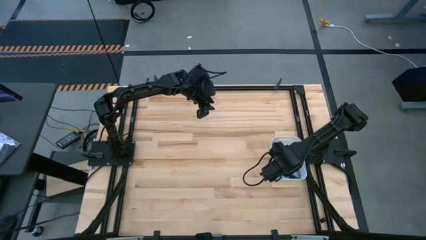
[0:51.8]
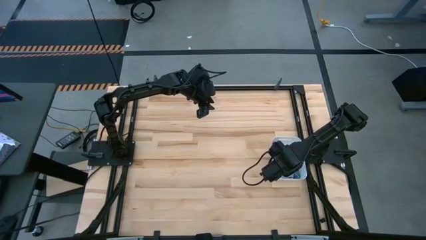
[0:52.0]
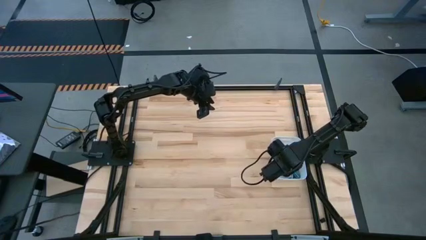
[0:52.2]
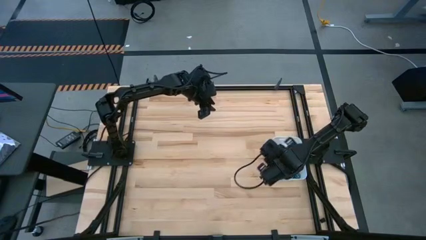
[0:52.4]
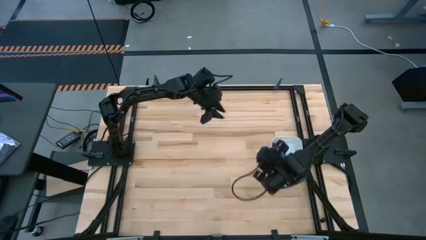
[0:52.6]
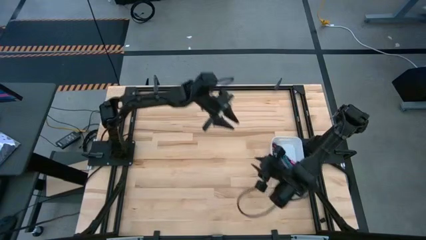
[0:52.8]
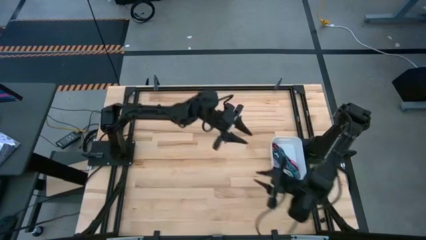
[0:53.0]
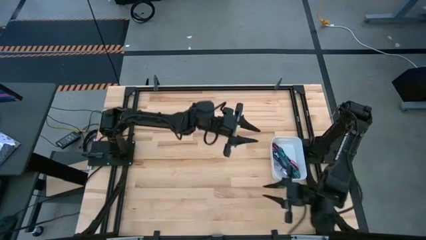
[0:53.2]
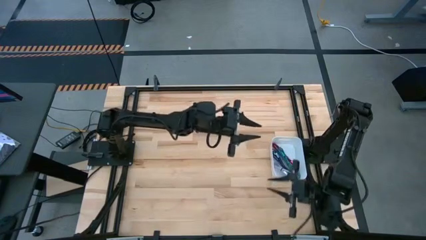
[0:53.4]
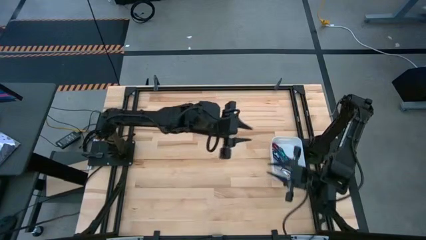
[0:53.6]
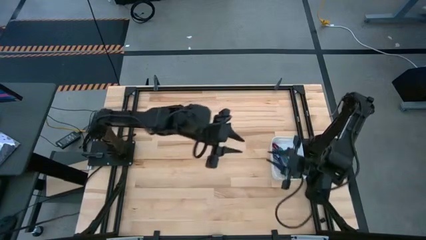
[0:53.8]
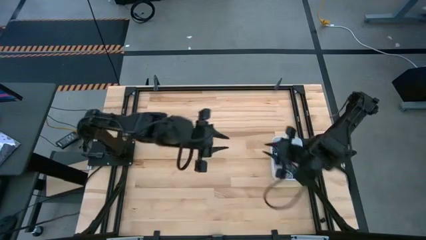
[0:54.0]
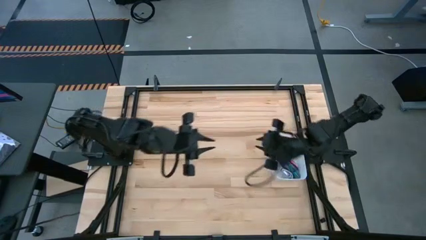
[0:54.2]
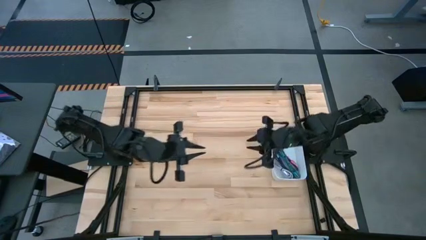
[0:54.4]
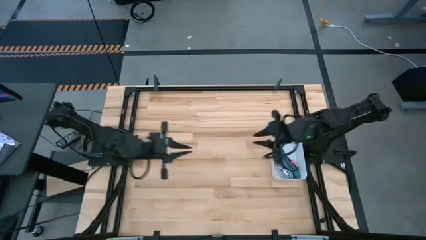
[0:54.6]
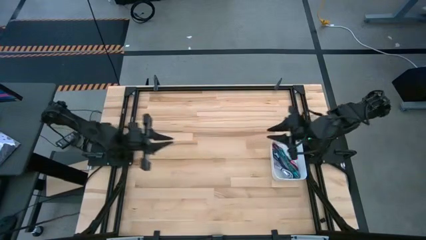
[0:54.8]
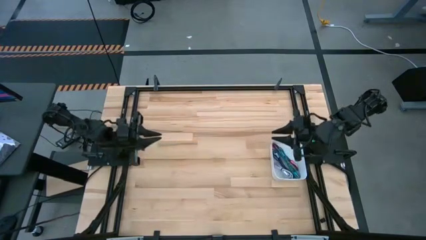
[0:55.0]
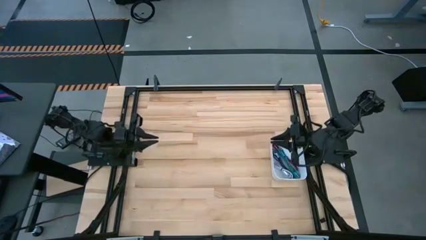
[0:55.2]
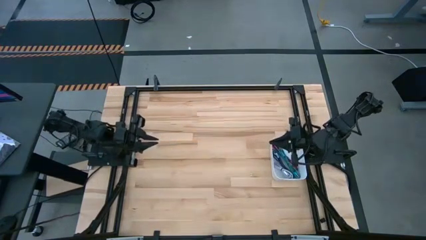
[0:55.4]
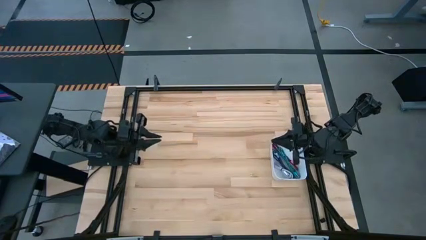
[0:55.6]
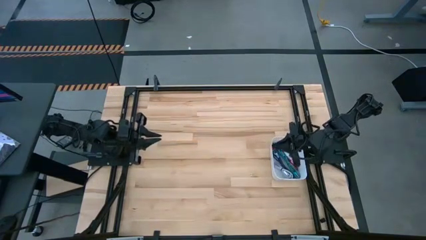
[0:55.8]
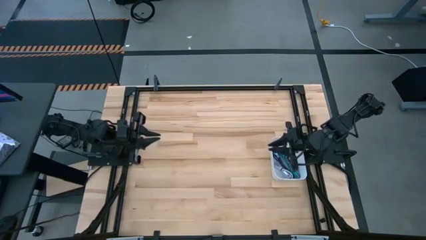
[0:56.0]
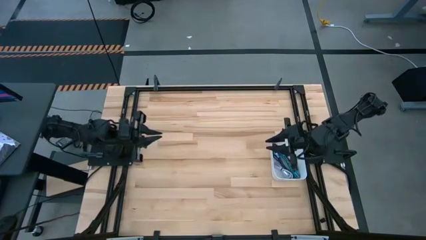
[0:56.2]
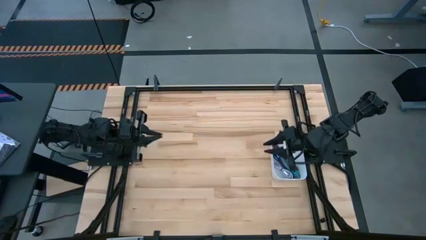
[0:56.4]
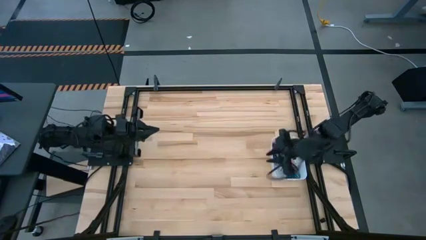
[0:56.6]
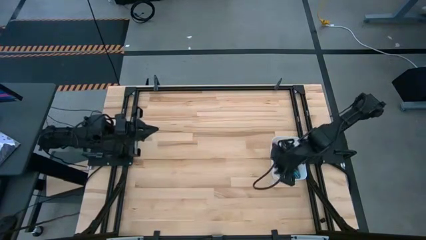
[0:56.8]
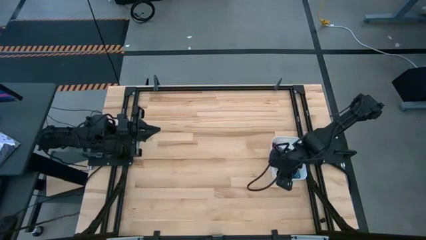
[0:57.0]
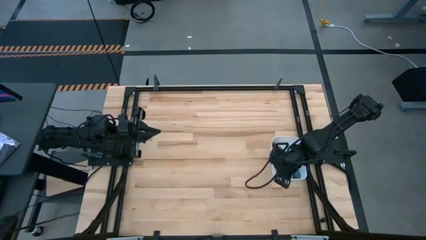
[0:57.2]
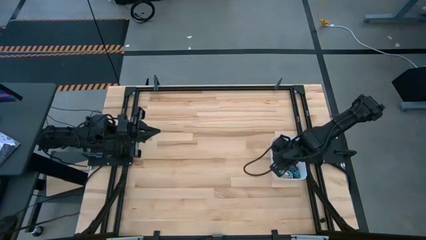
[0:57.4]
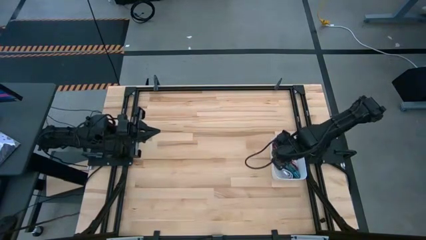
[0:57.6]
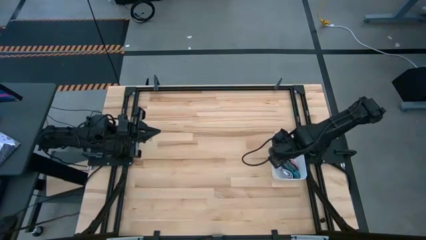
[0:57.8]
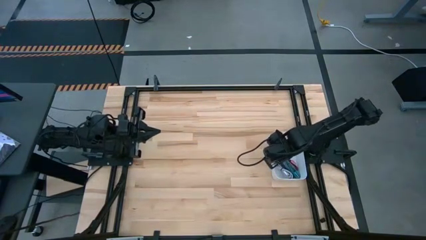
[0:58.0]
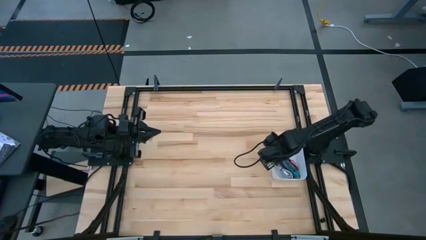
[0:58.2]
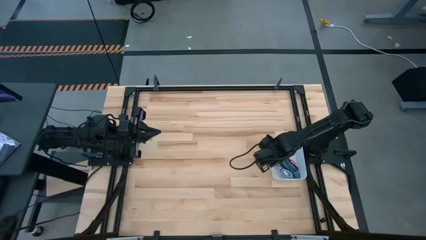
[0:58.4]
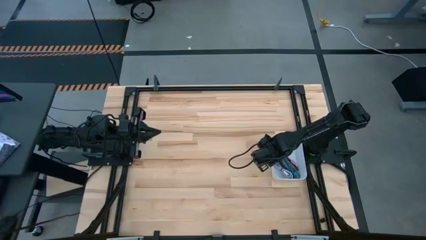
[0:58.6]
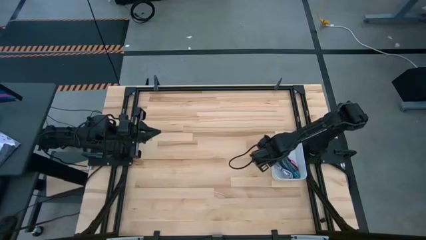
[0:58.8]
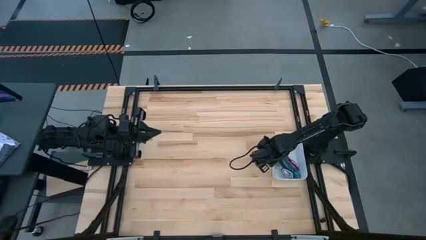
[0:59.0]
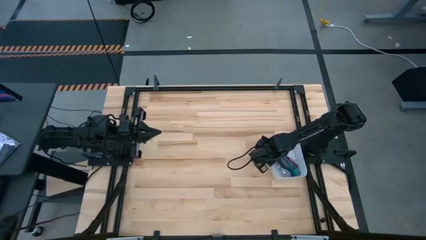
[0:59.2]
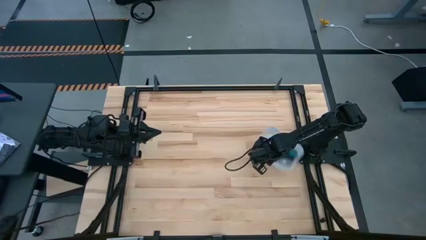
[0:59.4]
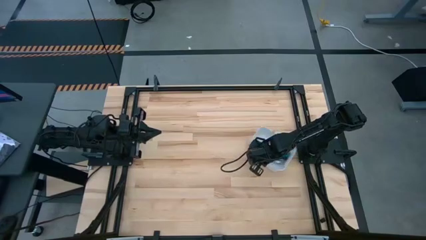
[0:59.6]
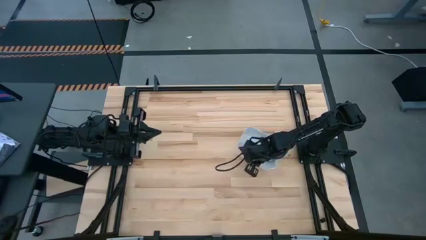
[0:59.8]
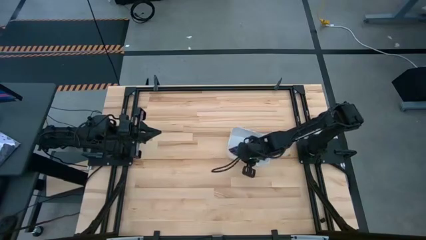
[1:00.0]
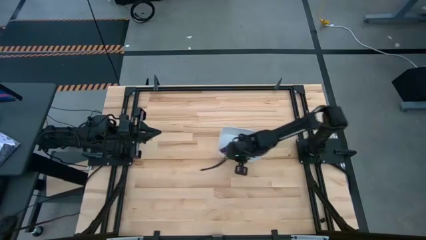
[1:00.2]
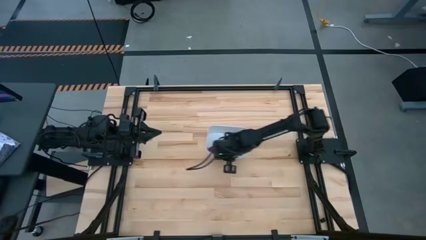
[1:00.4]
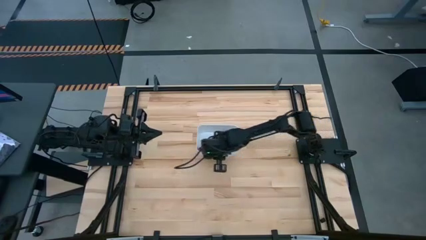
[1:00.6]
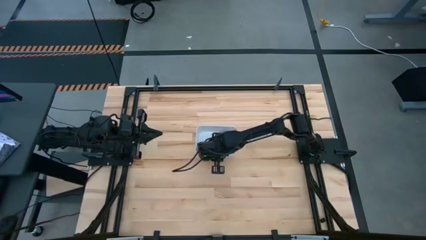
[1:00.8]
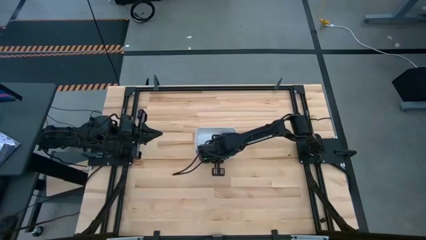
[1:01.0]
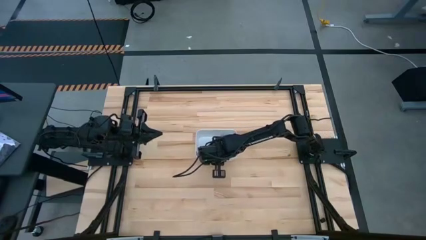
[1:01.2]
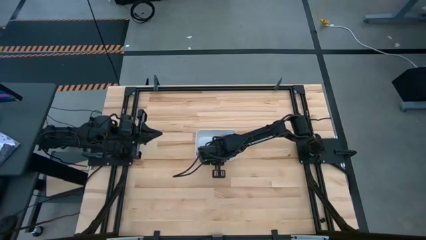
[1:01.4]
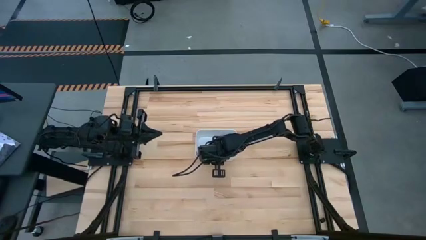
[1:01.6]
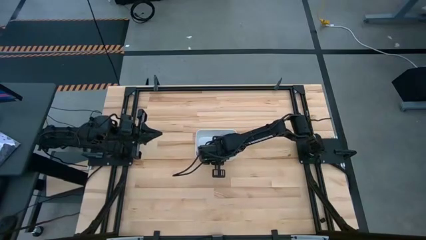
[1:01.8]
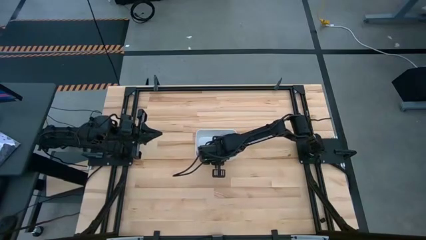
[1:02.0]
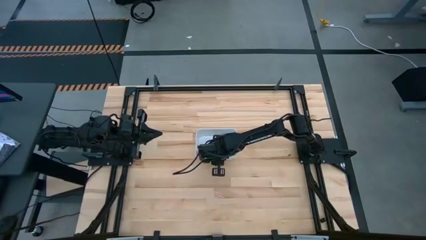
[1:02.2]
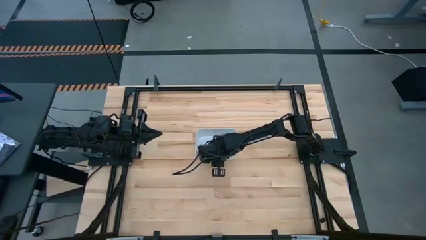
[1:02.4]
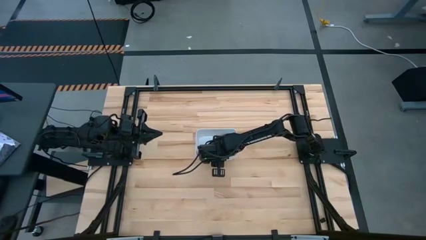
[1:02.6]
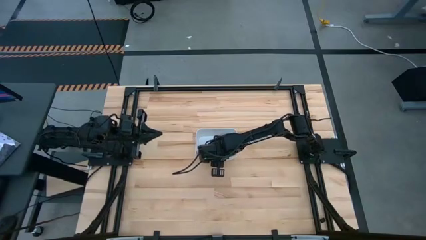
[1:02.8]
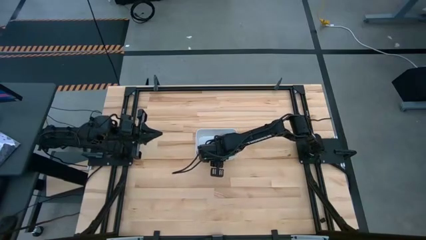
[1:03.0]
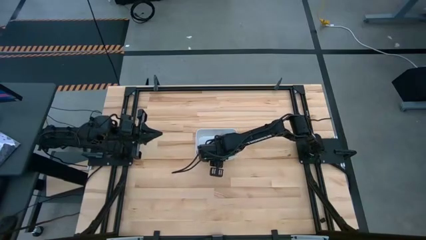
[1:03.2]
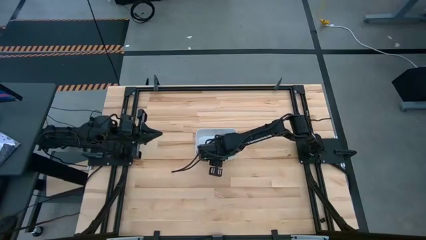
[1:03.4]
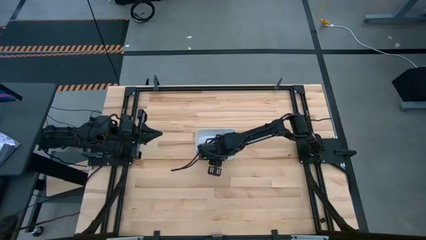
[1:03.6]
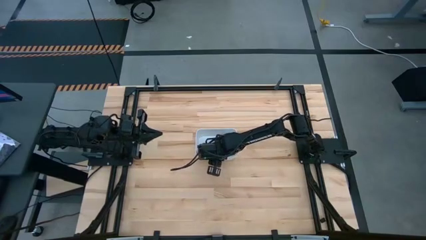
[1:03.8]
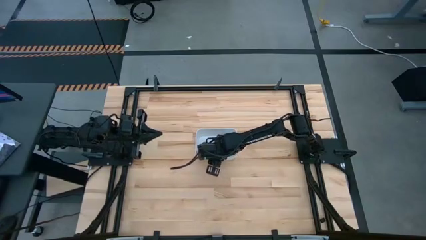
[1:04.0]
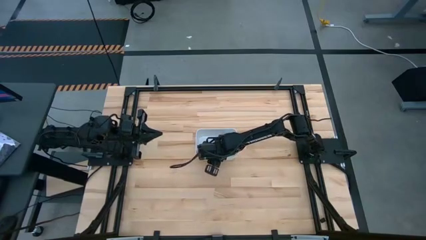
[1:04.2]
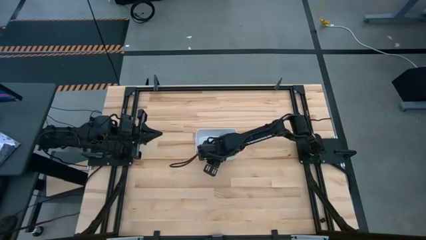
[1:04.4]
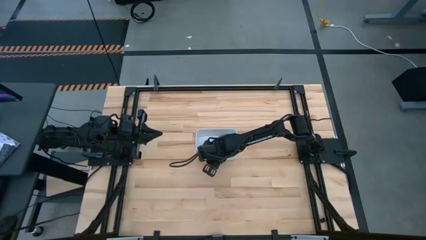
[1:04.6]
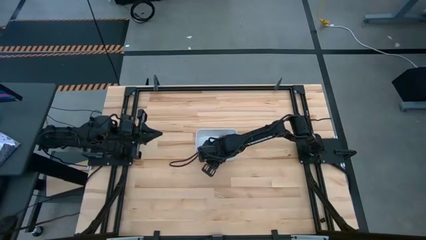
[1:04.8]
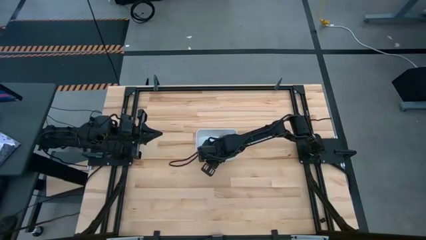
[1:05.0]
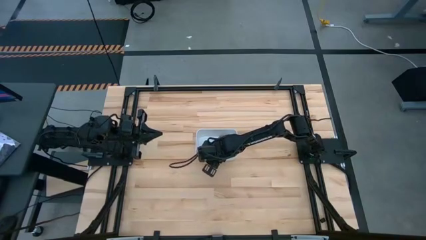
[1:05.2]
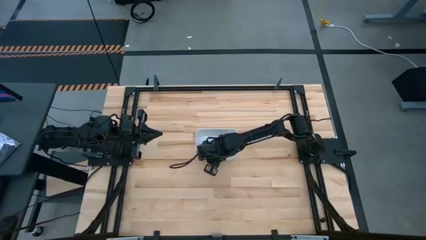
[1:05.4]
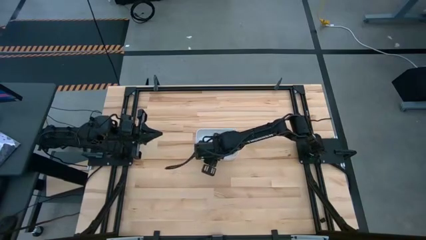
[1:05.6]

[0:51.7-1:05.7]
Task: Pick and place USB-C Cables
Move the white bin to the center of the table

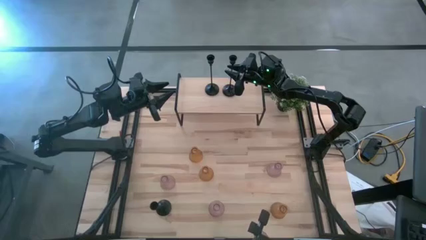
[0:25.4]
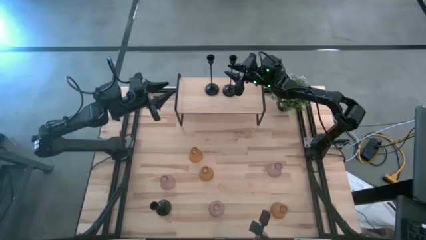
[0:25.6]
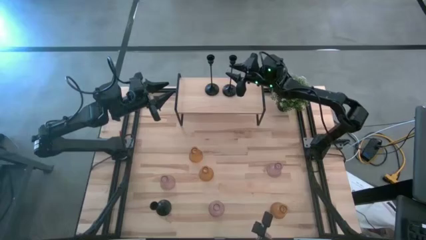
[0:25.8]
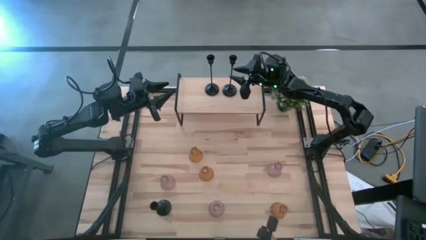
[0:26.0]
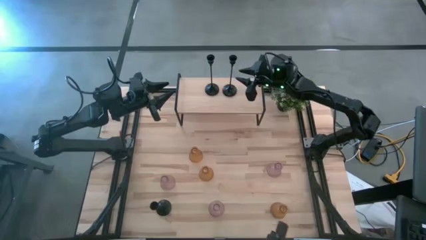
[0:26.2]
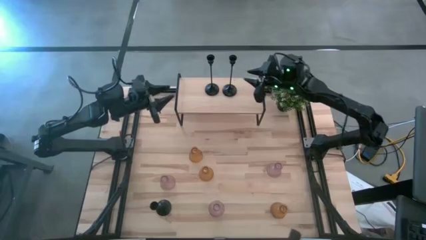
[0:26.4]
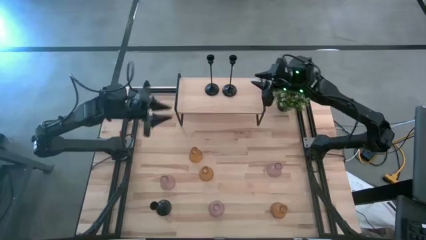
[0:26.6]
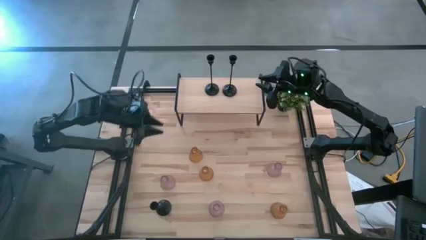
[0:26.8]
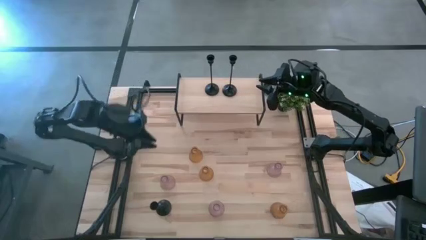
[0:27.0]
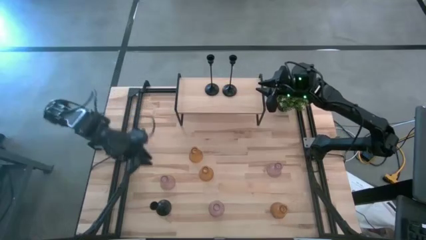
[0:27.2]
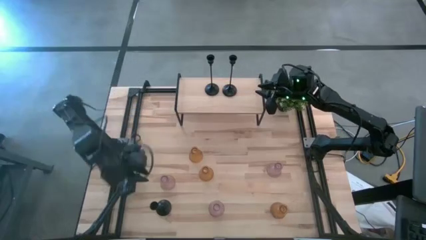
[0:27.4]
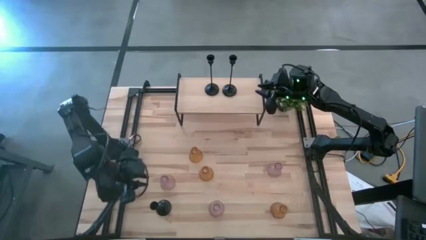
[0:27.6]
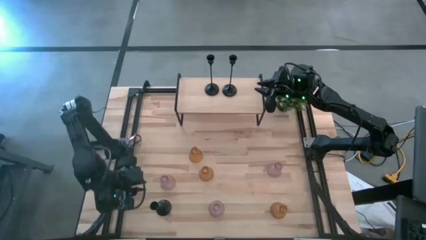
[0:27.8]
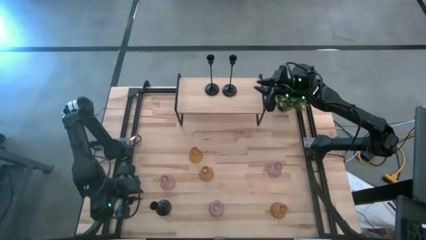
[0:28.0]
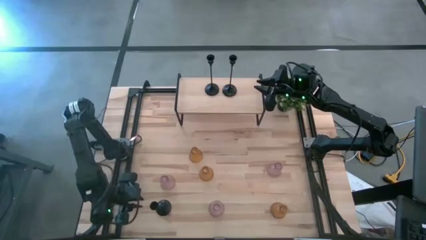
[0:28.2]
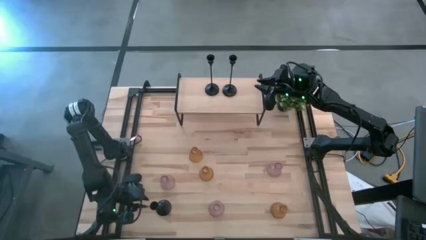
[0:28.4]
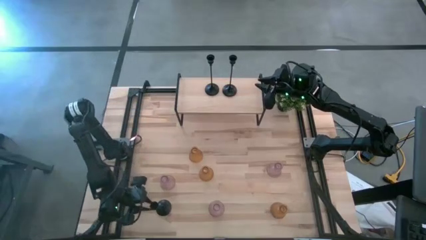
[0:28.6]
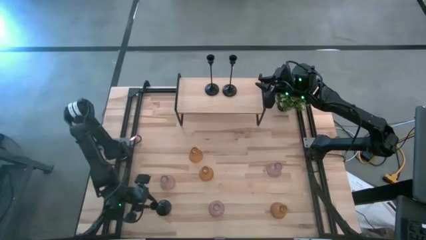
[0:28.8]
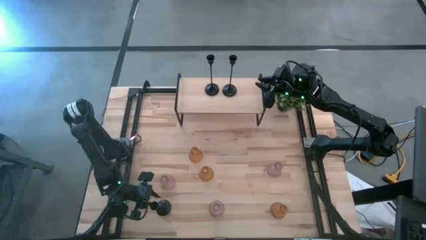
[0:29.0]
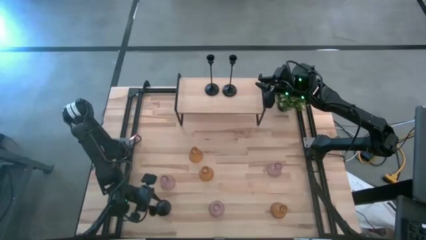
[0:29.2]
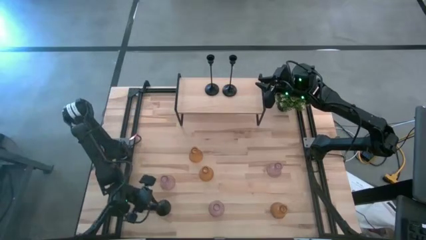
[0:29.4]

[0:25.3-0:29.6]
Task: Pick & Place candle stick holders
Put the black candle holder on the shelf
